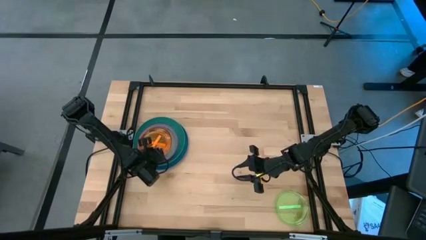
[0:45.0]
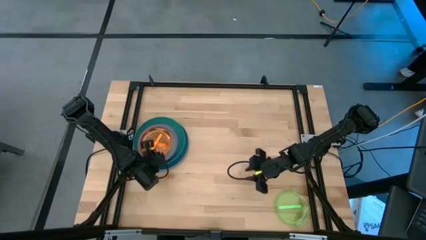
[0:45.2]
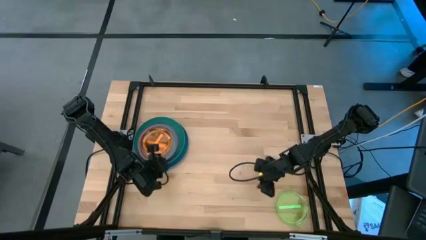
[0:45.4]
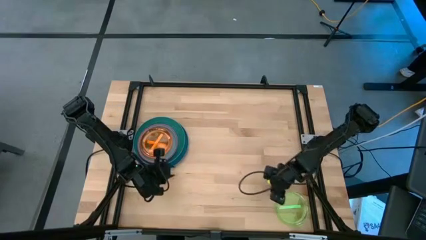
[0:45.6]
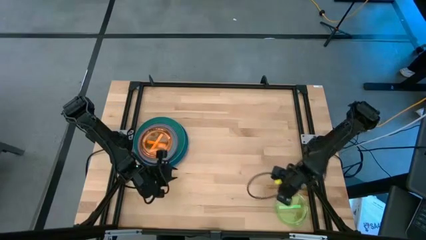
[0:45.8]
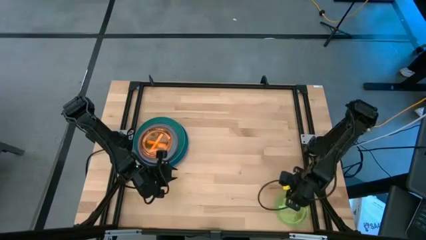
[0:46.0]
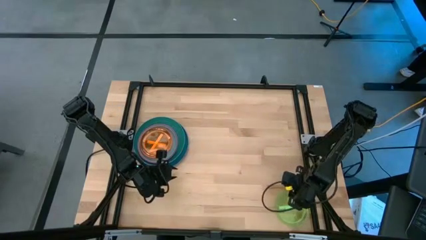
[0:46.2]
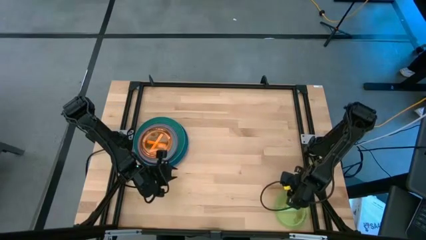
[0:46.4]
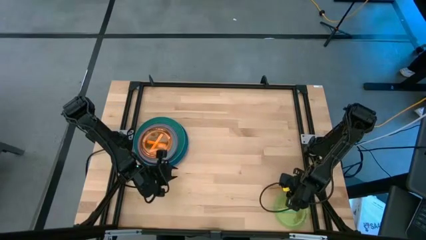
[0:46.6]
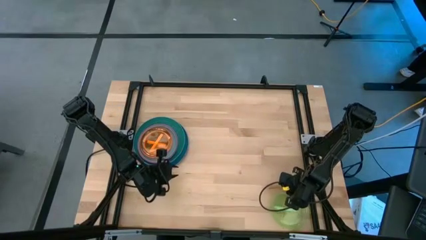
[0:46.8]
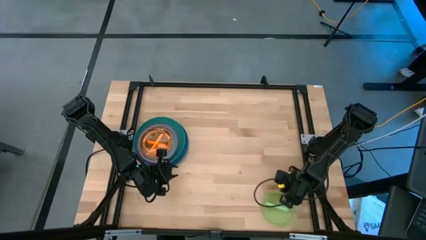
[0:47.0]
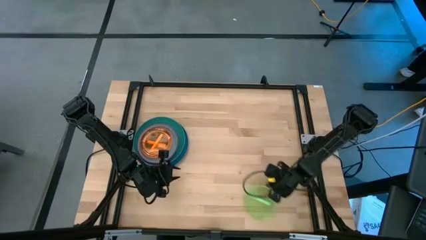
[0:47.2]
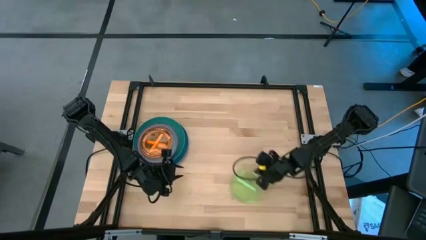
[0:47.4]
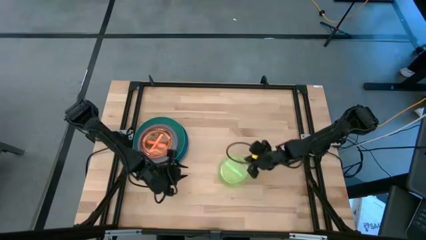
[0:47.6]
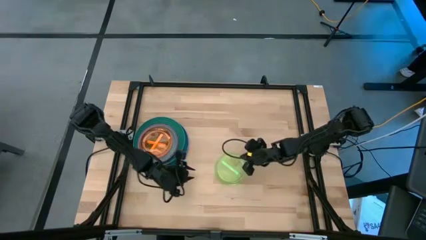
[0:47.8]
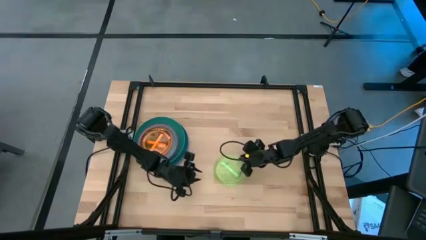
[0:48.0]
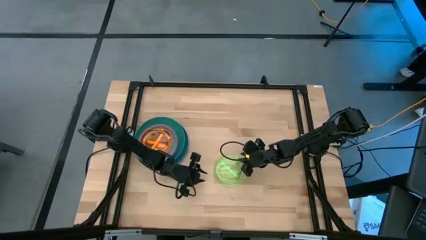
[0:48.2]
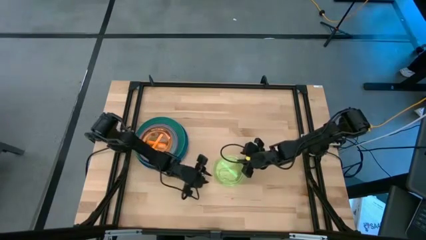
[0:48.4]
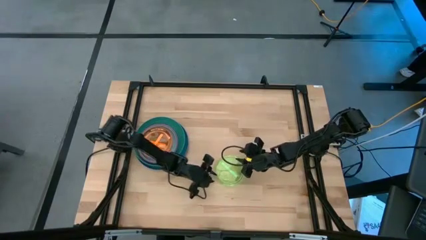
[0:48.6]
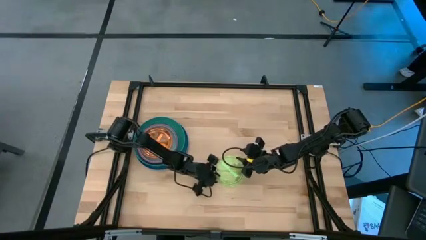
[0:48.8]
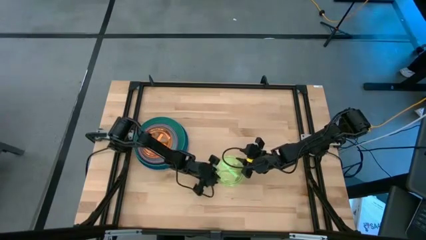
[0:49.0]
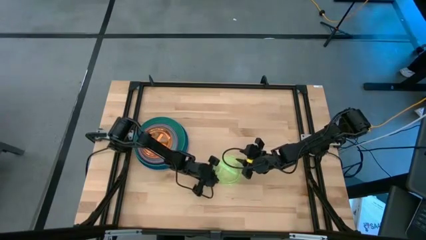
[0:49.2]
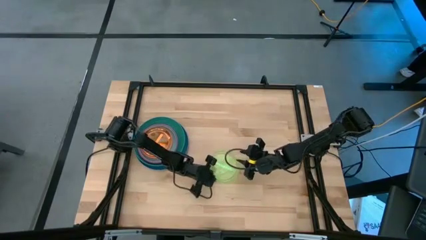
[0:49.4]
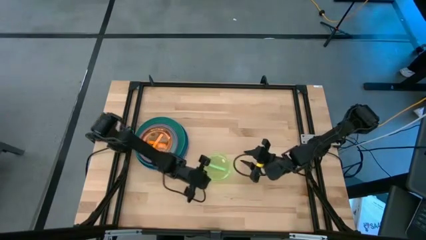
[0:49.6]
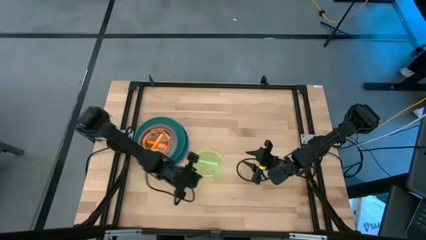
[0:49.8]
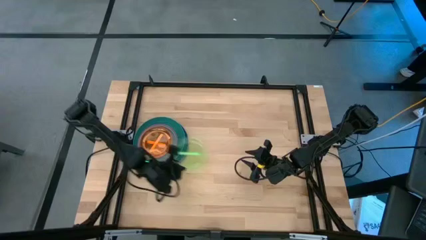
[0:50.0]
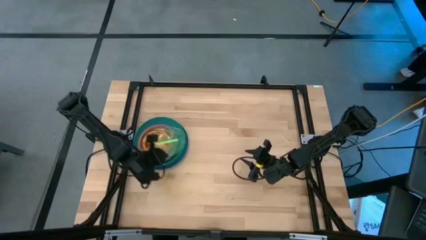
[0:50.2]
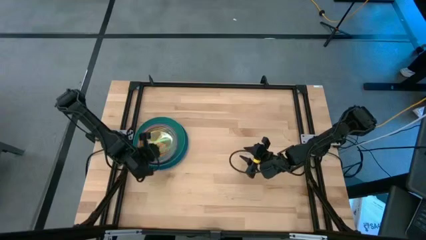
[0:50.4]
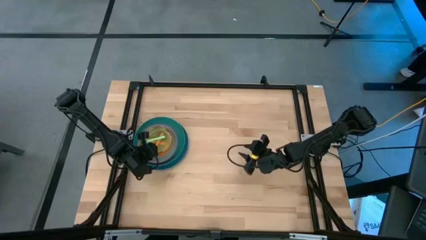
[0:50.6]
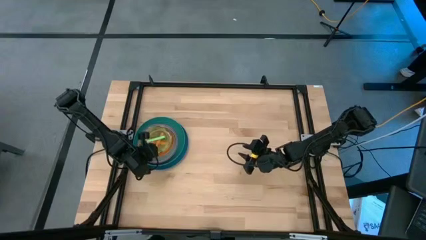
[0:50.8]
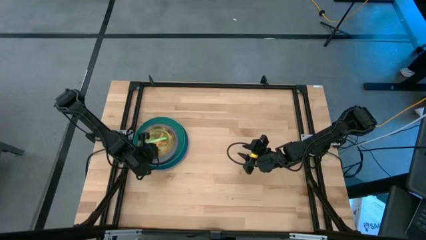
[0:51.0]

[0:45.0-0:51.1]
Task: Stack plastic plates
Stack the light green plate on top of the orange plate

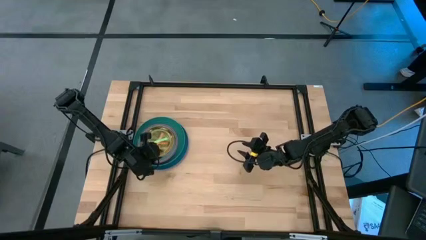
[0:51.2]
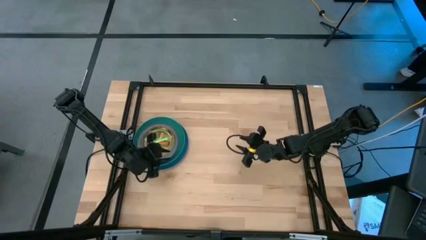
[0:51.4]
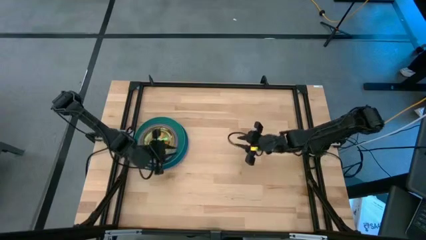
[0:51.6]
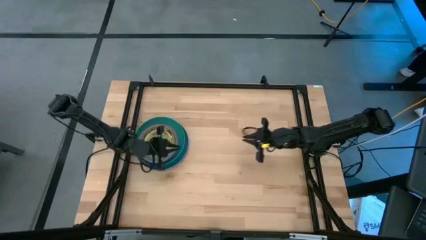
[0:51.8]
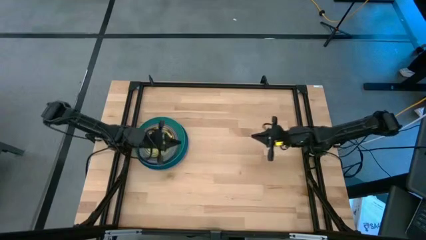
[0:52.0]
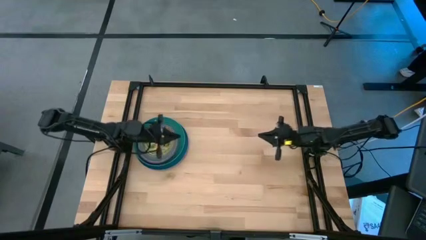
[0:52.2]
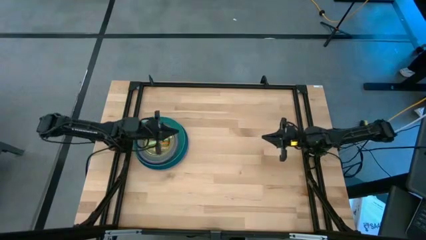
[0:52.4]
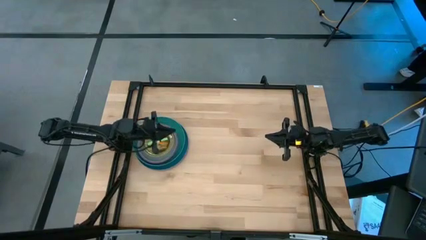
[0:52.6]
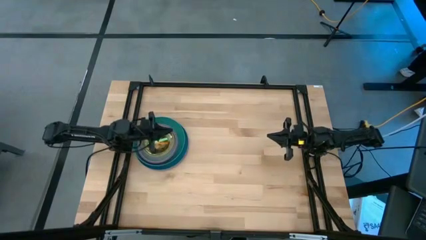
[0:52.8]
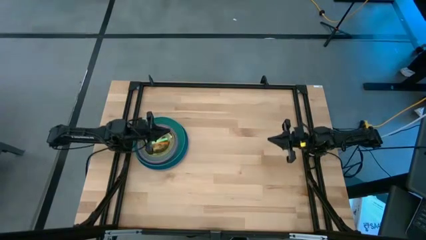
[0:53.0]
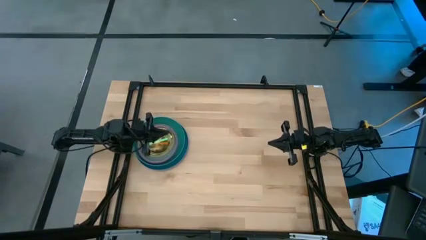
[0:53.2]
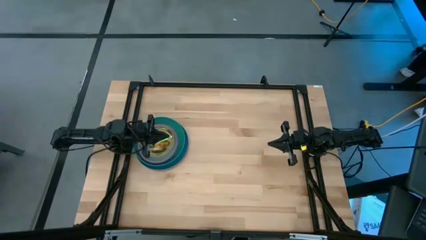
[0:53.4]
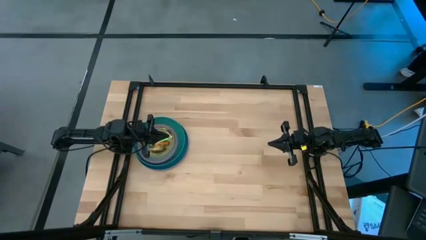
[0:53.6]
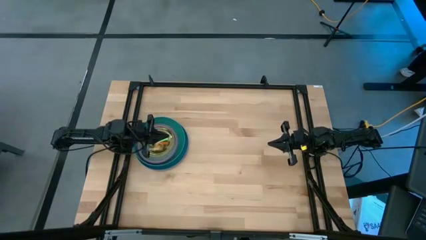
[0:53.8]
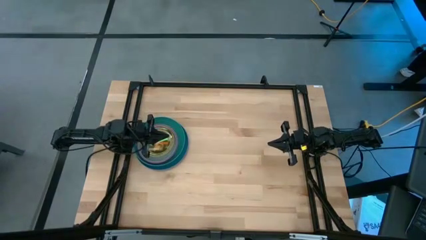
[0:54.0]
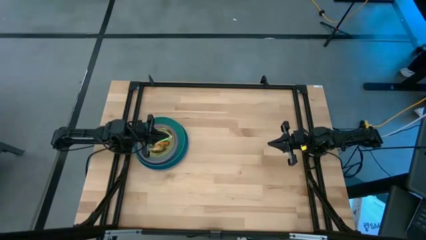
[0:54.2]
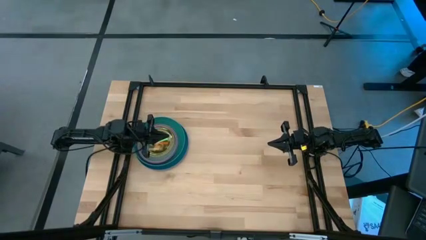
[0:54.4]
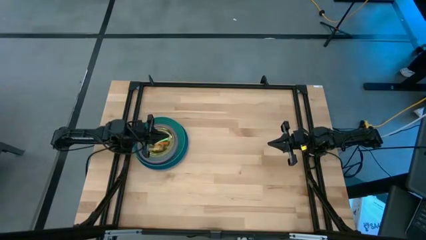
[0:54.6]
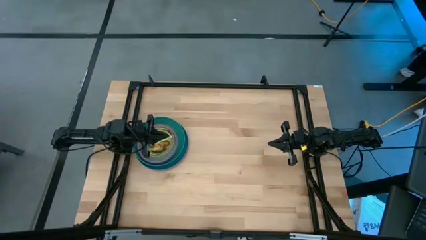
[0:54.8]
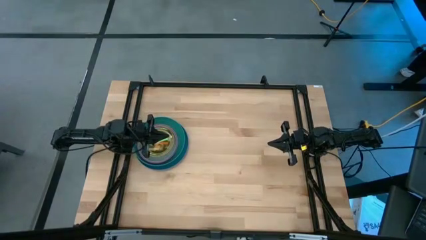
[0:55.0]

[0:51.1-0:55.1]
Return to Home Position

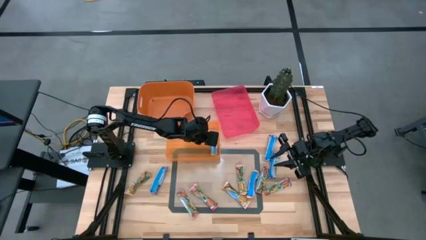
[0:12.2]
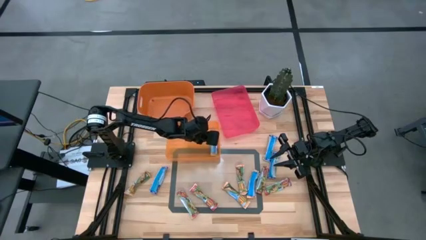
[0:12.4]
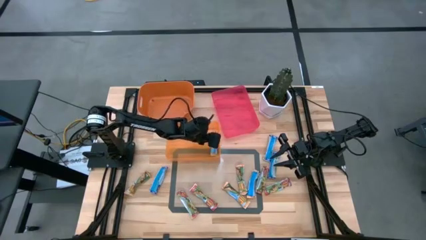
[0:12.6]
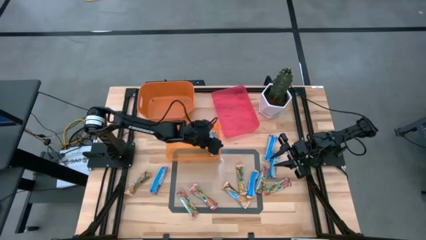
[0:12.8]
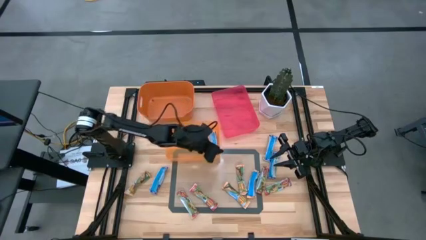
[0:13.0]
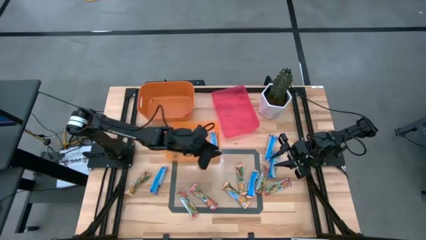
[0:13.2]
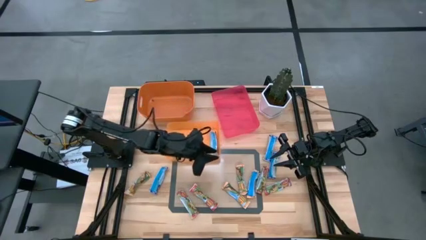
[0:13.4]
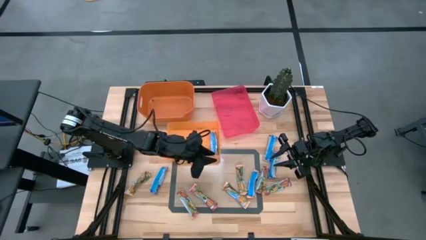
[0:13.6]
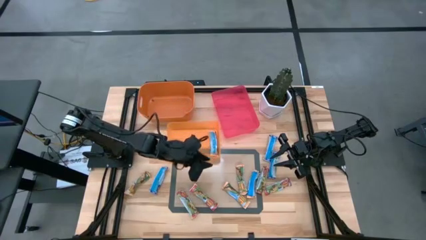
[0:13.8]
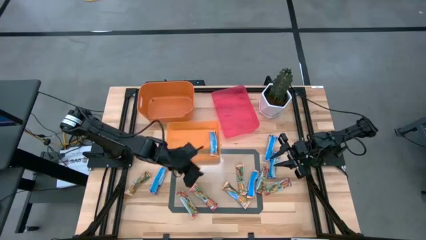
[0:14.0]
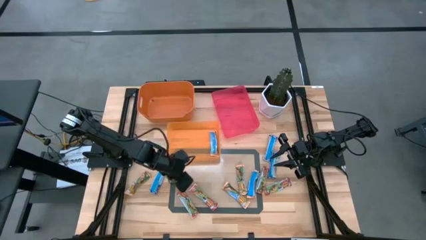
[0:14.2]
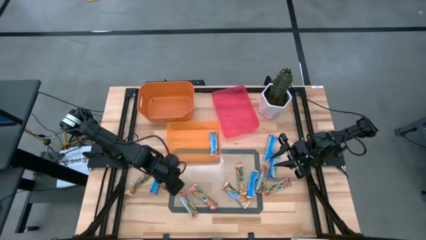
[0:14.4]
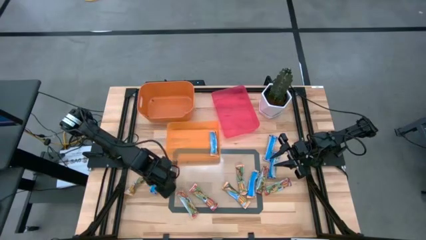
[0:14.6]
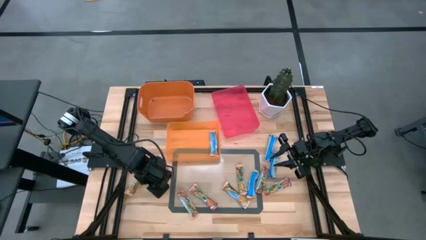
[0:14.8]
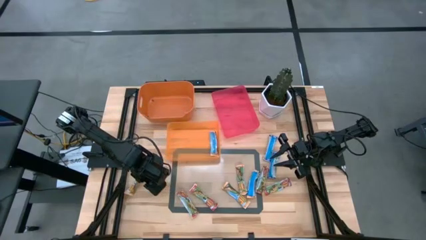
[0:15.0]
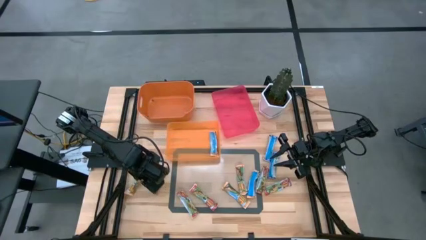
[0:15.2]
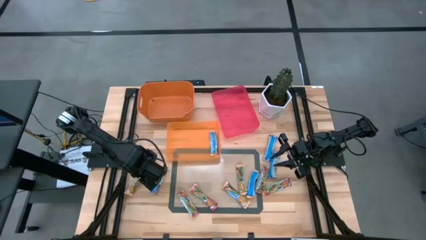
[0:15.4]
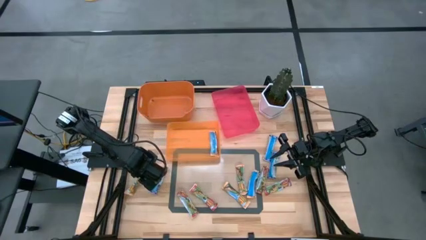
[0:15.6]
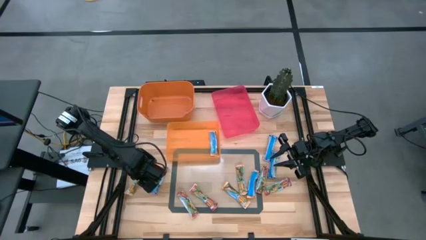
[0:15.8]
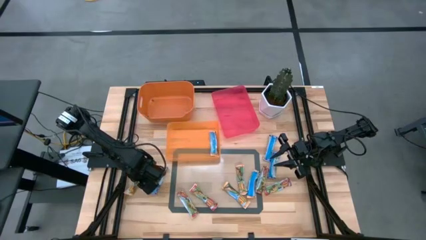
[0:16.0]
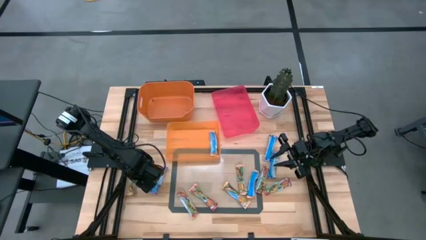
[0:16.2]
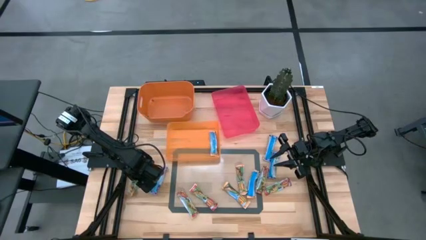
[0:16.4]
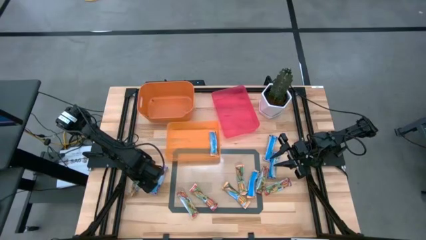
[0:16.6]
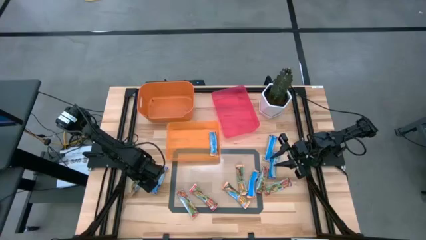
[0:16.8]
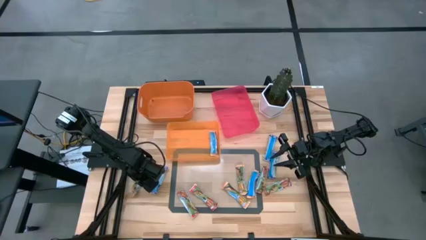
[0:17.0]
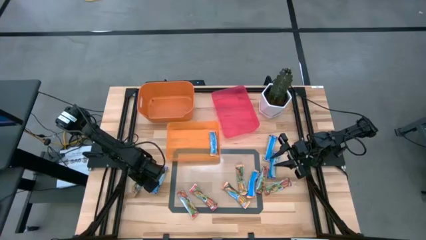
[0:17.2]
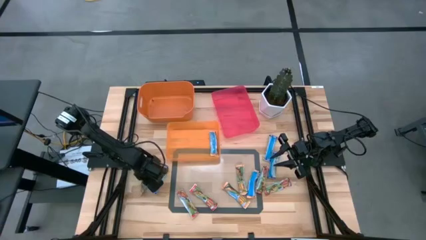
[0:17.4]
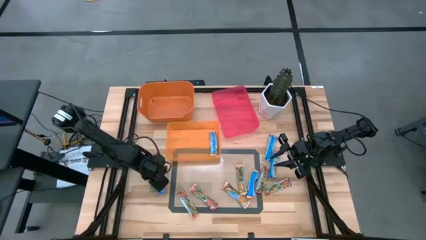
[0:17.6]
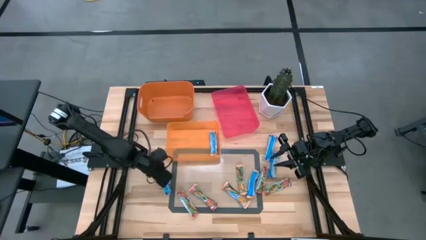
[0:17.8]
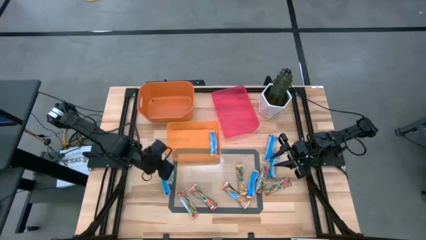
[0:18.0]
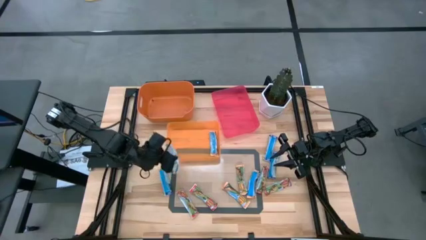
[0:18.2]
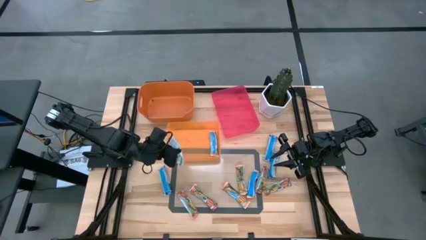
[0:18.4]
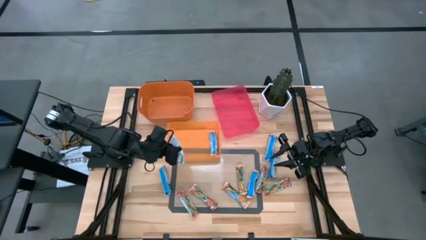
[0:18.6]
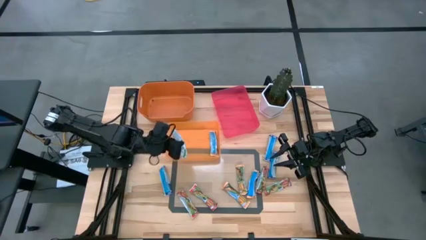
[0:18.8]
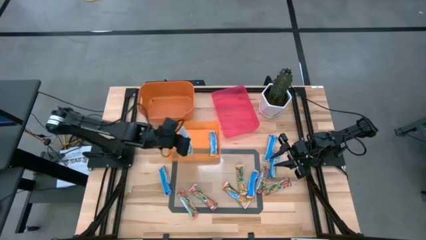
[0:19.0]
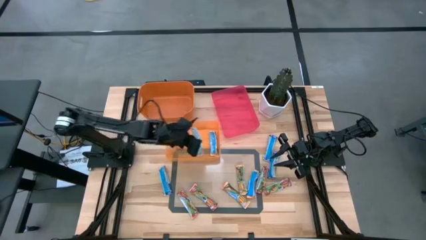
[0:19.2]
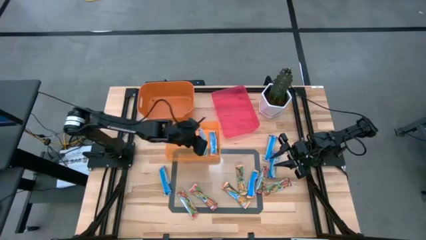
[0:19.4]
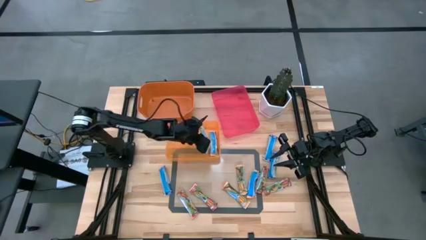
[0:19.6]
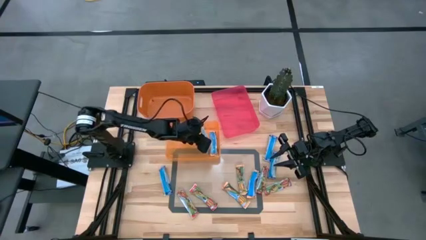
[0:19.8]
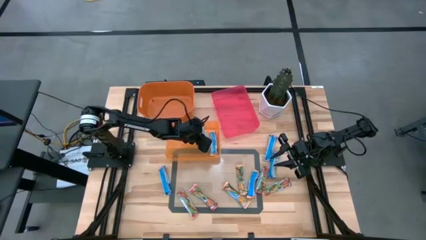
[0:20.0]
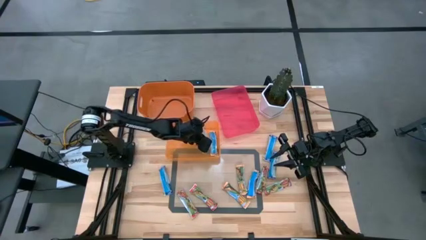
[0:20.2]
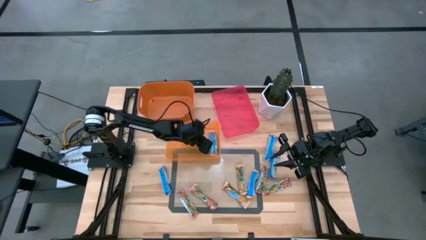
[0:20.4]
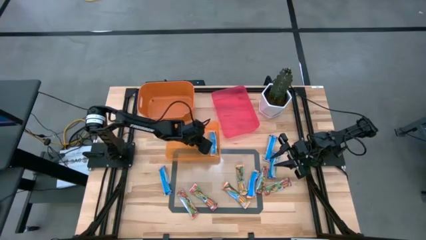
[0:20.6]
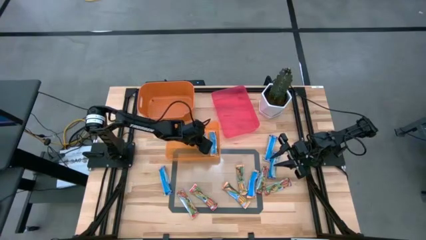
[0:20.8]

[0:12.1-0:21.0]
Task: Pick and place Granola Bars by type
Put the yellow granola bar into the bottom orange bin
